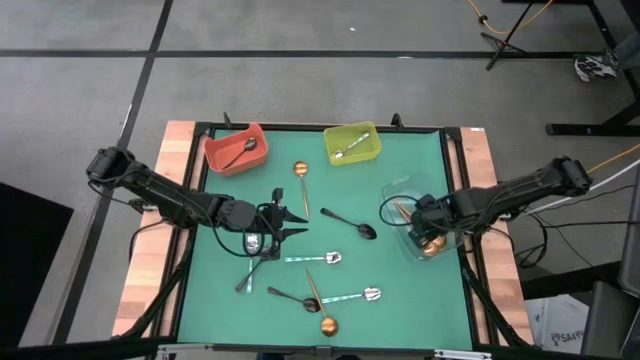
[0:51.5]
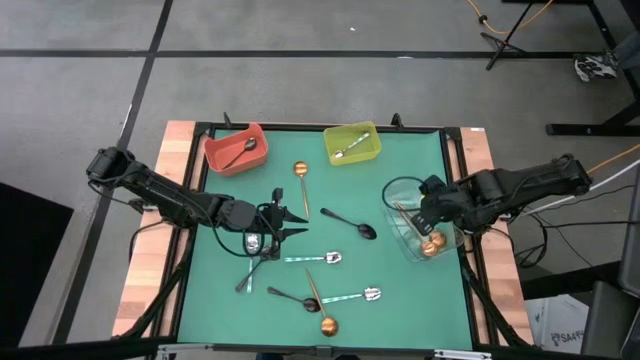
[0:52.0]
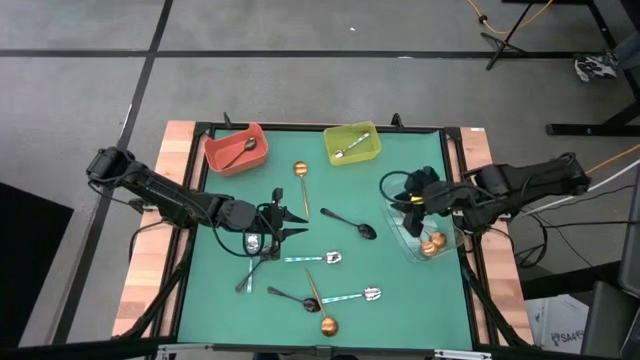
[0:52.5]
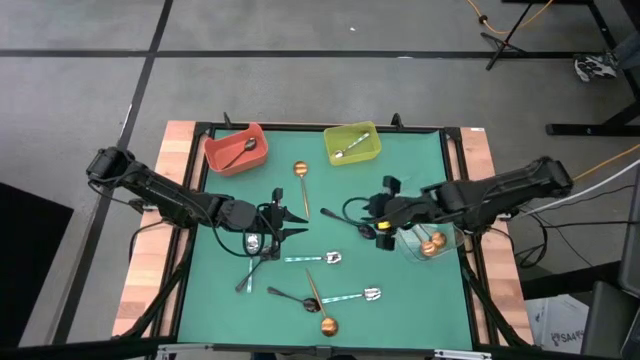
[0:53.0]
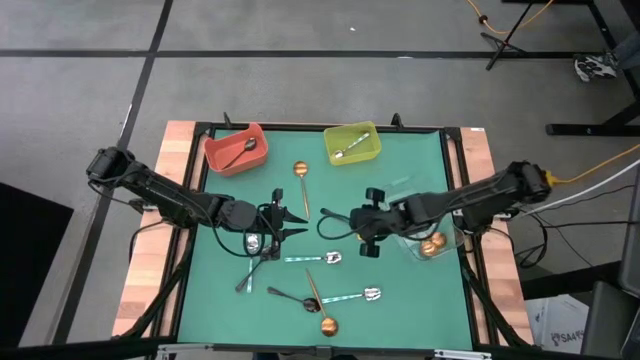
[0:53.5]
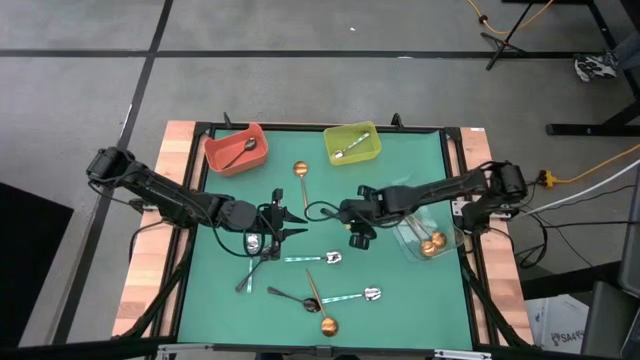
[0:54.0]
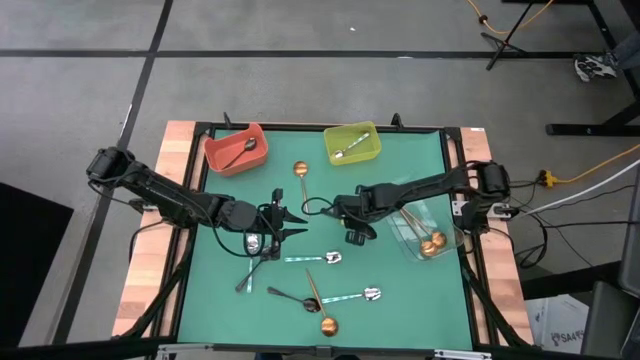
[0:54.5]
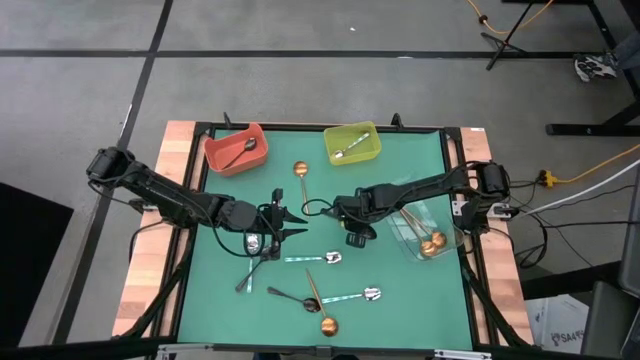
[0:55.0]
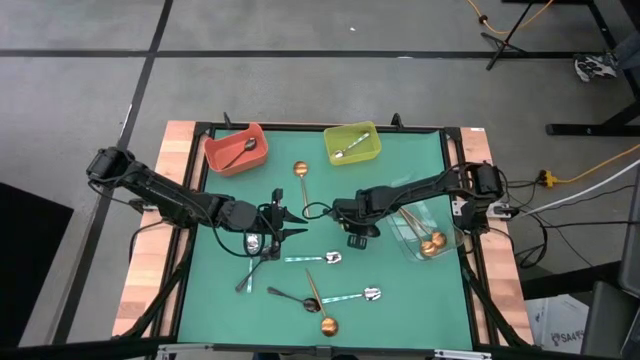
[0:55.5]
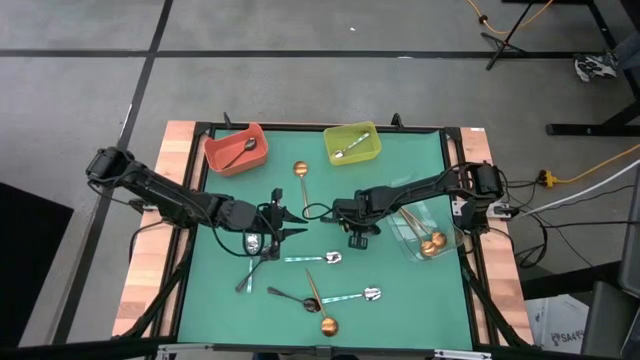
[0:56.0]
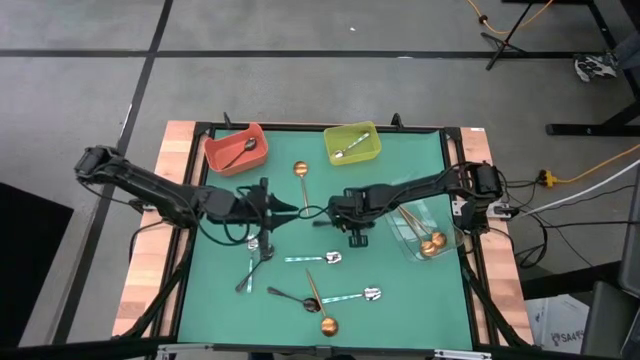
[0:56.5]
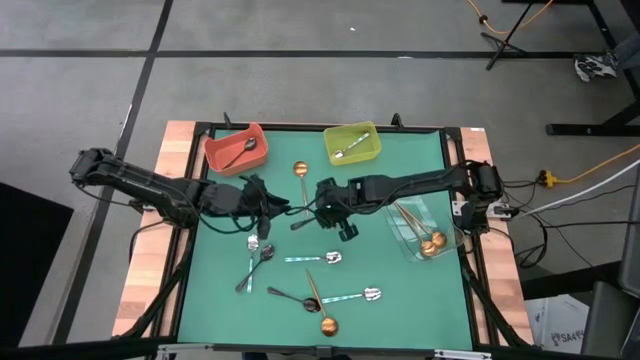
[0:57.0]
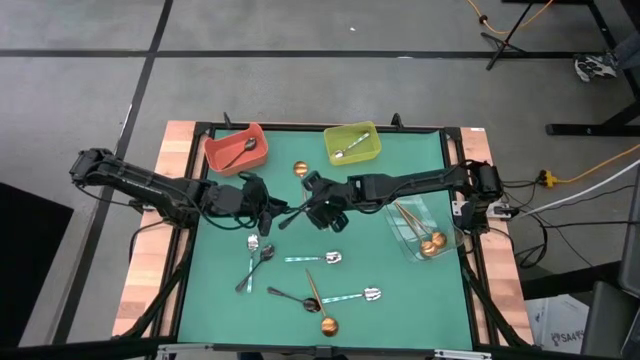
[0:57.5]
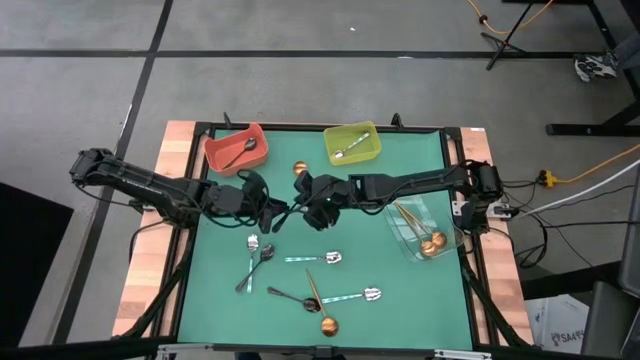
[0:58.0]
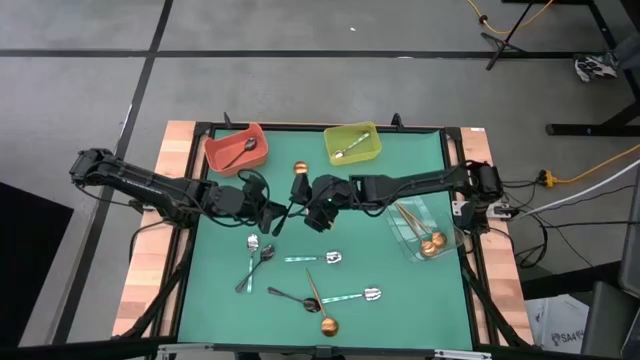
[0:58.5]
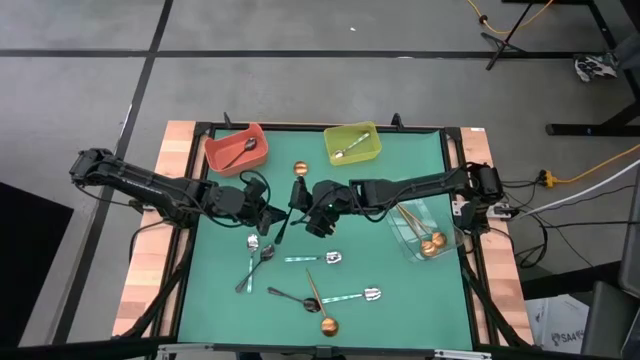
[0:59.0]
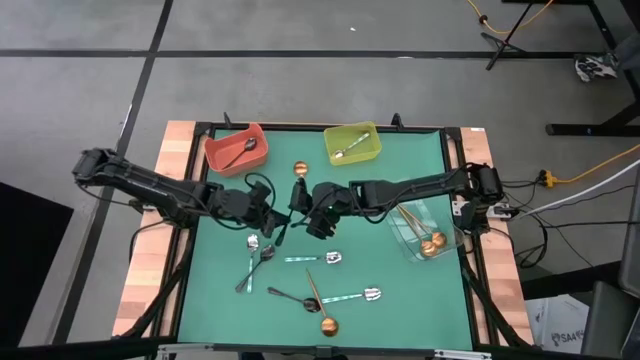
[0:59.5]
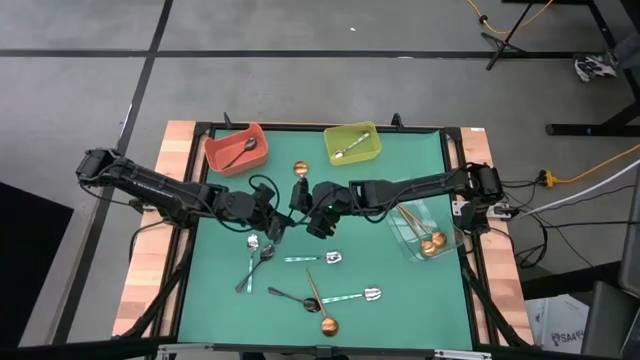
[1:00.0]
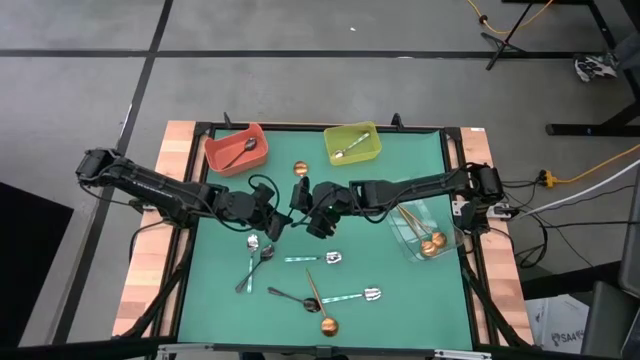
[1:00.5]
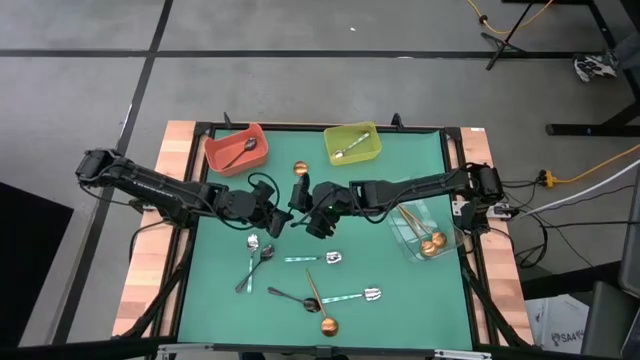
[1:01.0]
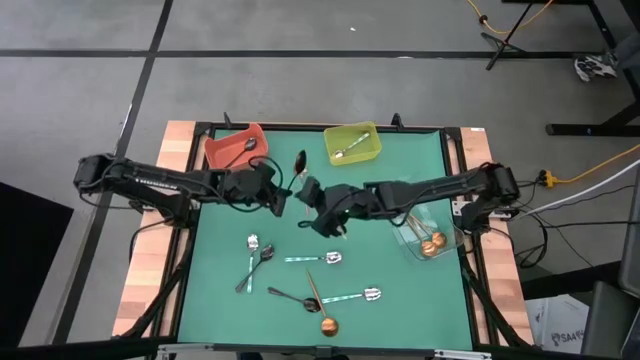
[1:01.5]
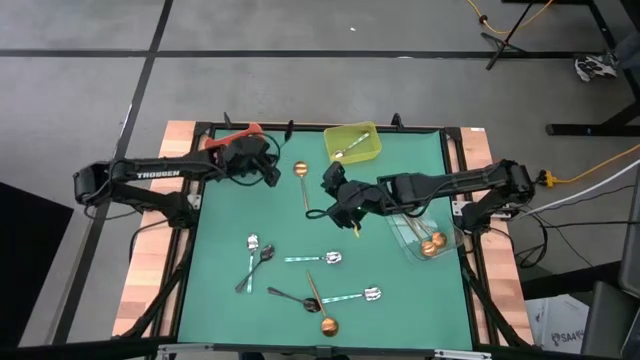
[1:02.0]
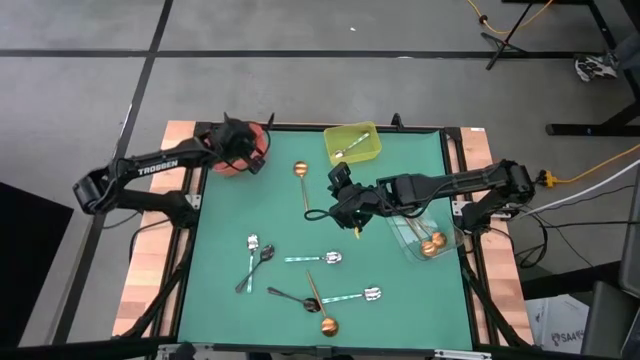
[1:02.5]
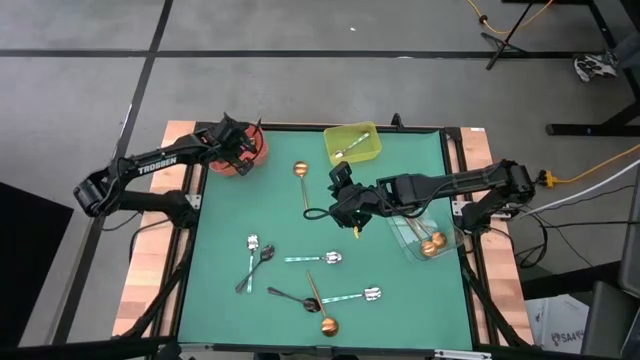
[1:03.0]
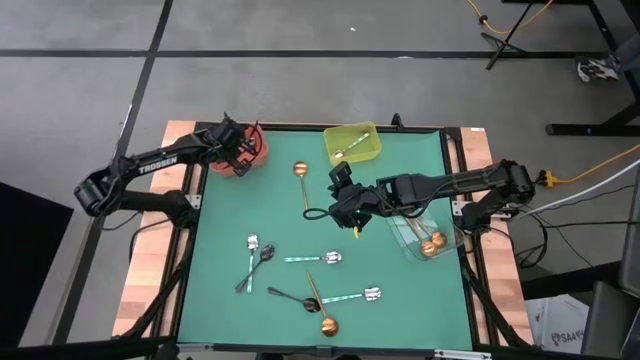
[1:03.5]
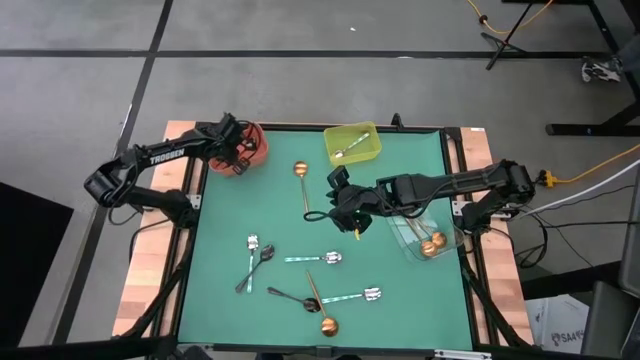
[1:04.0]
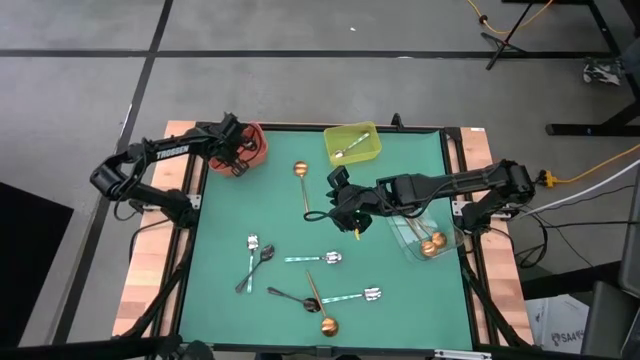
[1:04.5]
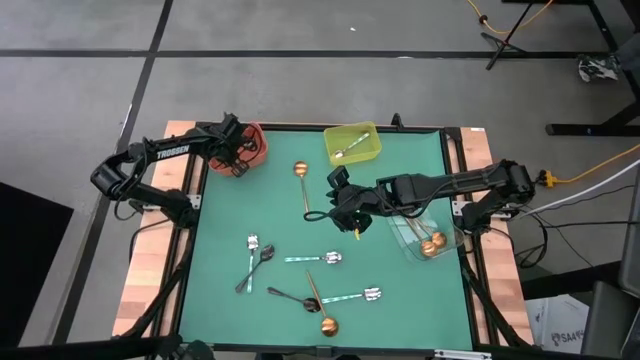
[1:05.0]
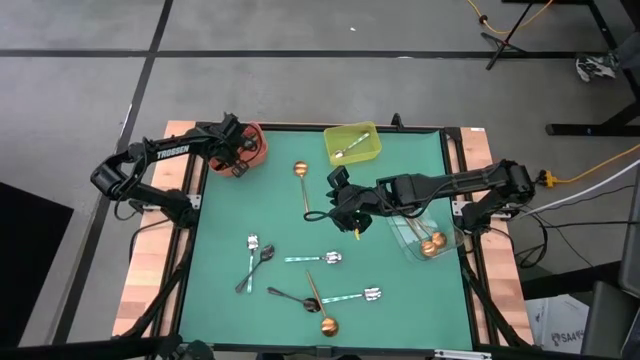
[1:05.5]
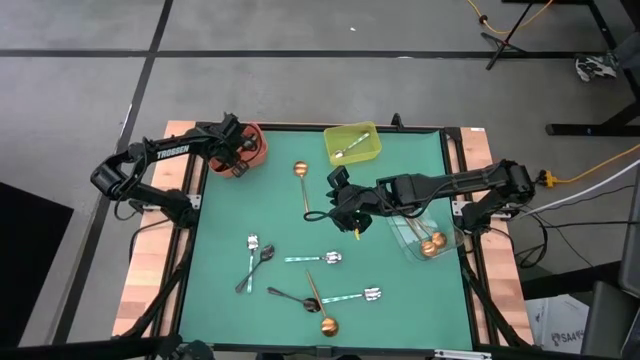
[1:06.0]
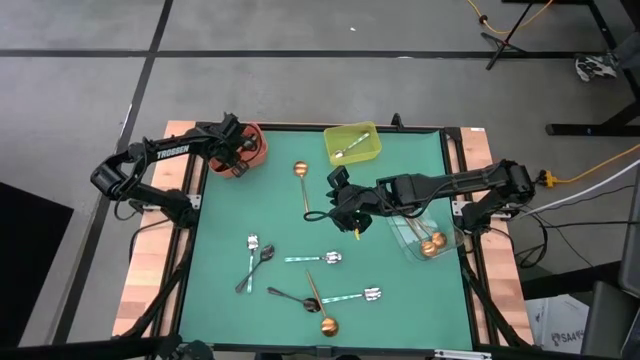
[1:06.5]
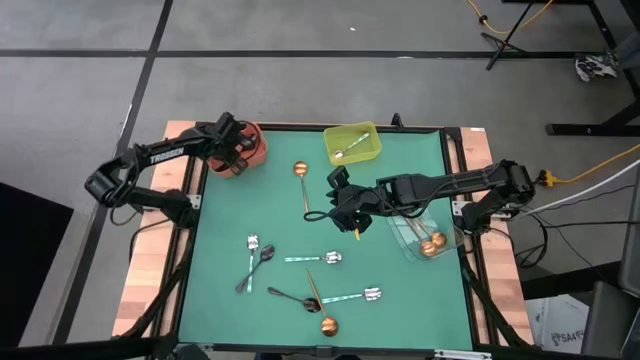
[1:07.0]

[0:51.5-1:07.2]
Task: Sort silverware by color (type)
Put the top right black spoon into the orange bin

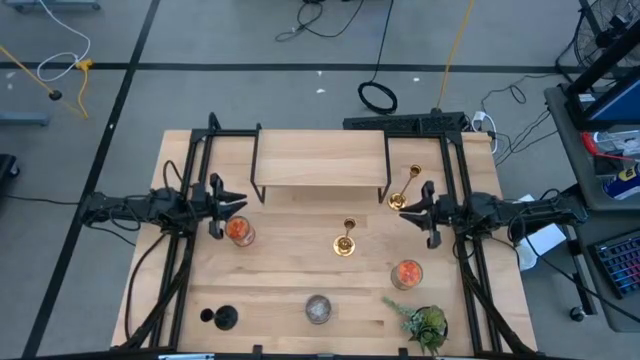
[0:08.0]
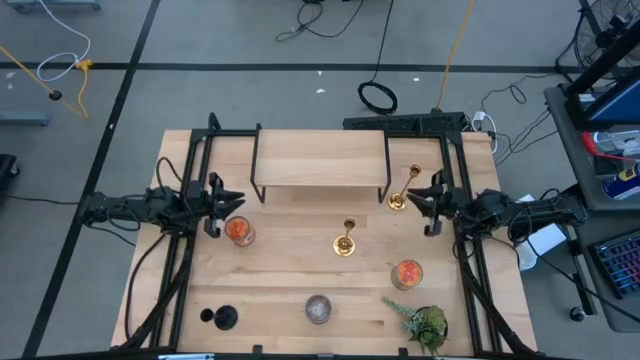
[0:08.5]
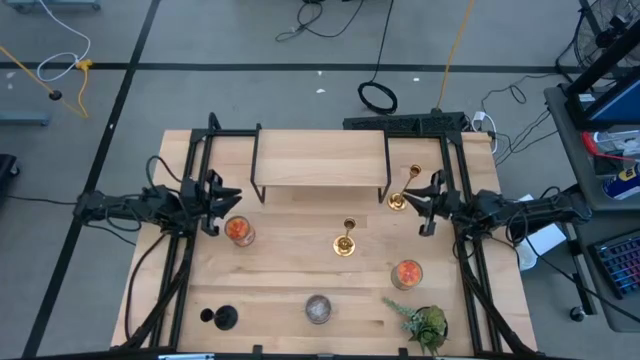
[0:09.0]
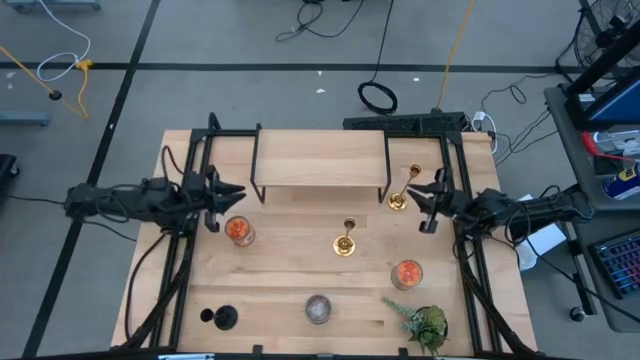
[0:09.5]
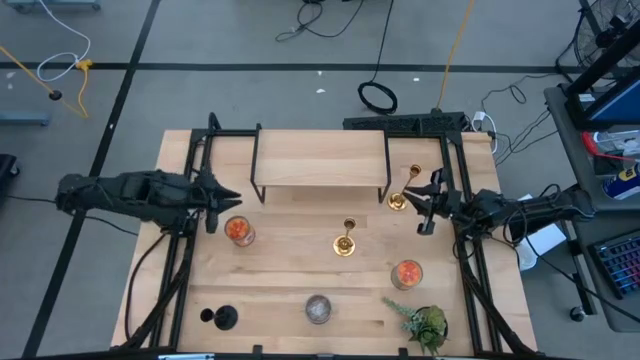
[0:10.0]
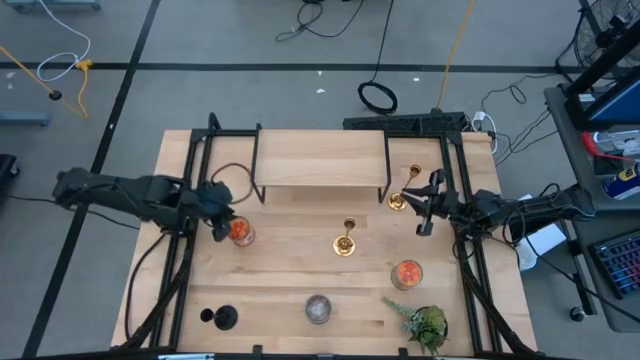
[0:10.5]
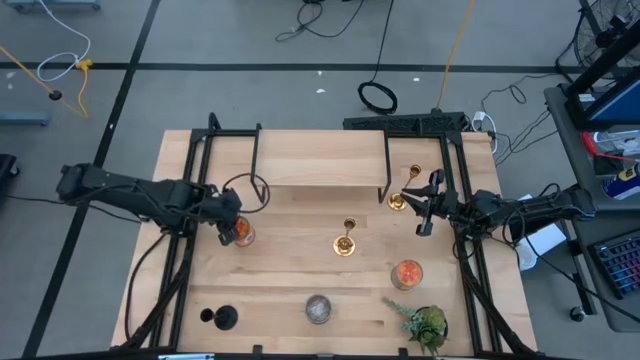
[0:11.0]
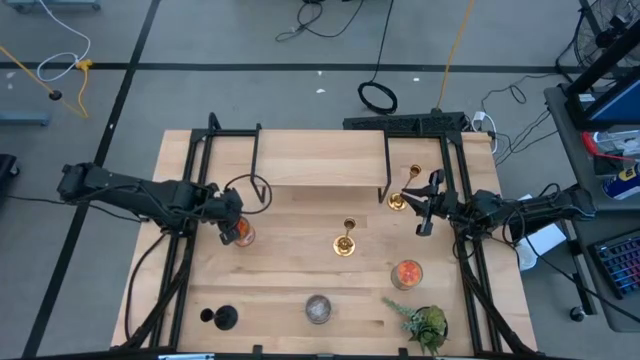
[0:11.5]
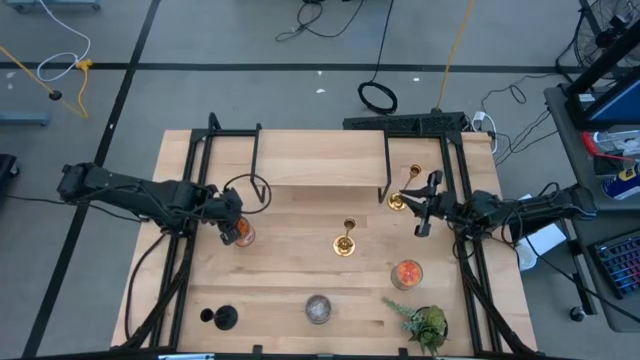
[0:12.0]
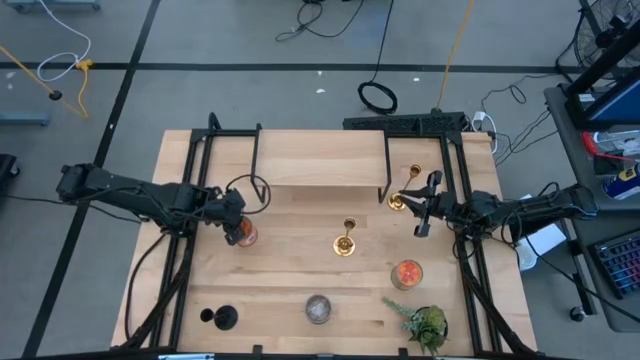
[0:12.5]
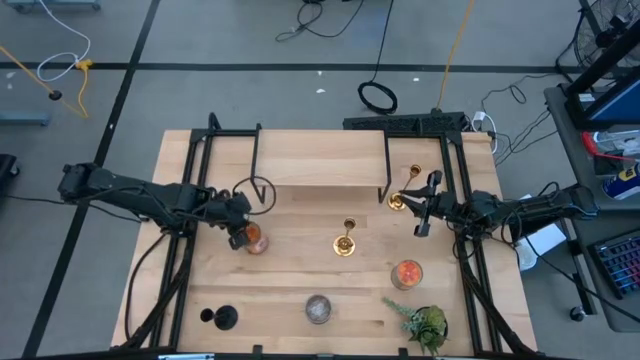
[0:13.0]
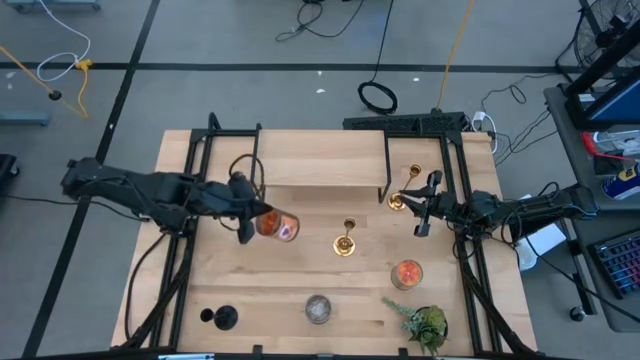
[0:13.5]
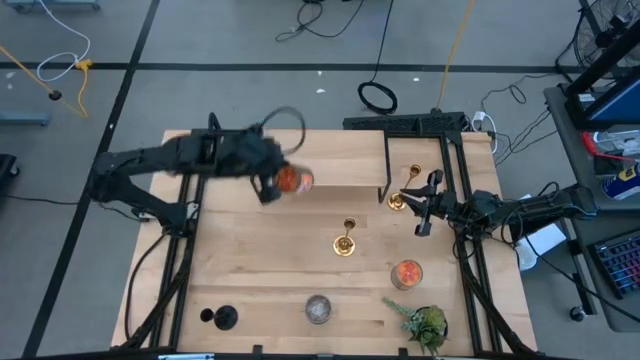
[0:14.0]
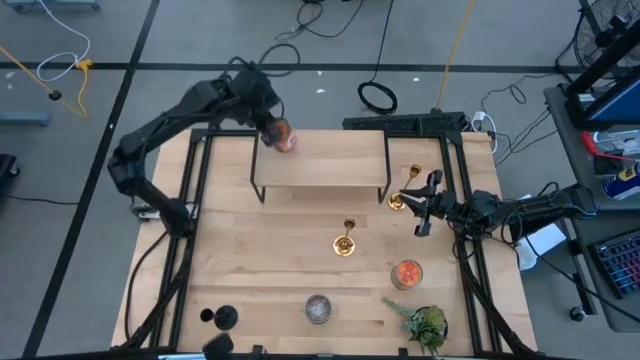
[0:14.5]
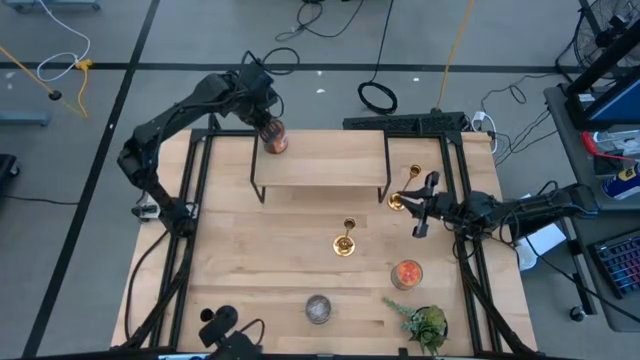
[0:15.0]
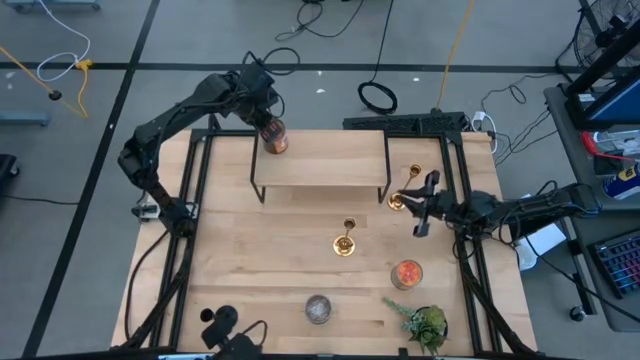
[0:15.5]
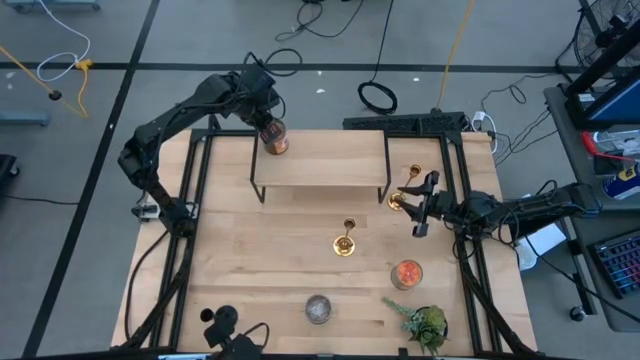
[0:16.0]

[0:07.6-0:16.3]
Task: Pick & Place candle stick holders
Put the left orange candle on the shelf
